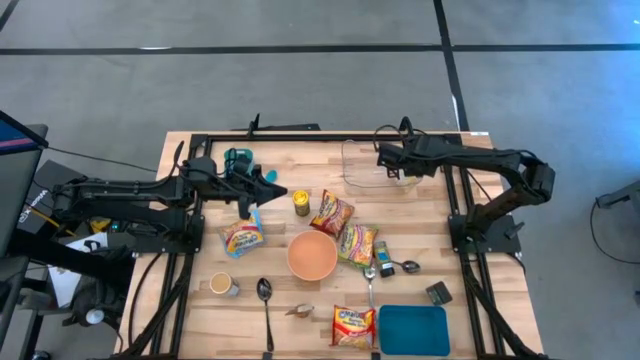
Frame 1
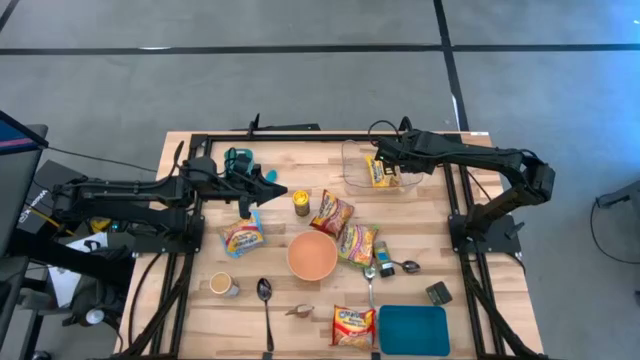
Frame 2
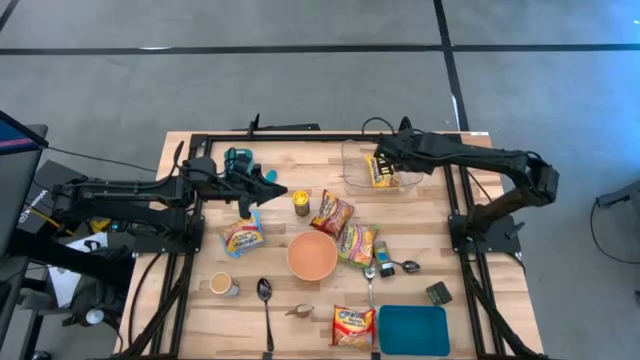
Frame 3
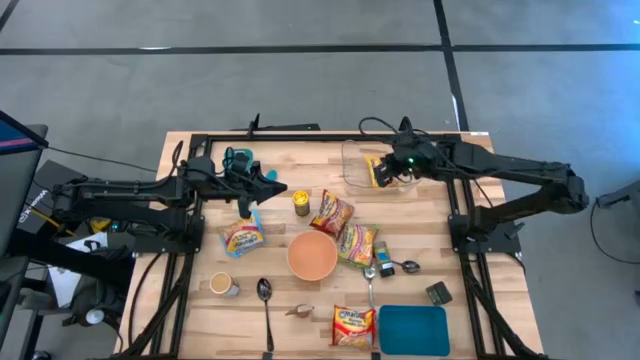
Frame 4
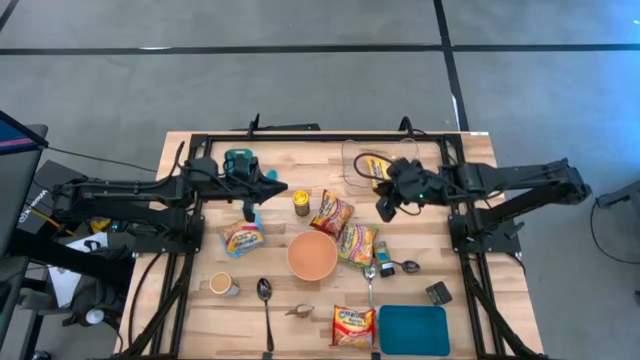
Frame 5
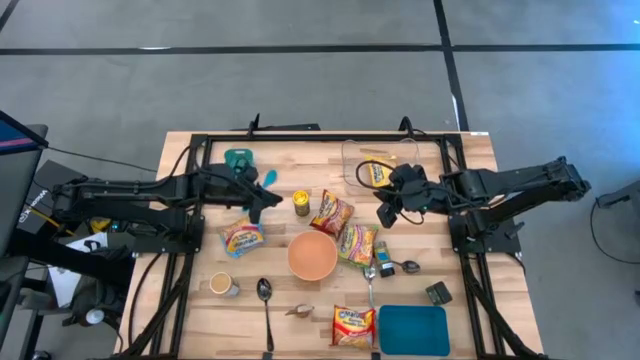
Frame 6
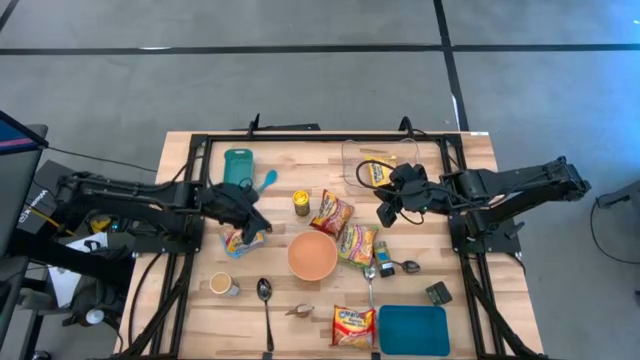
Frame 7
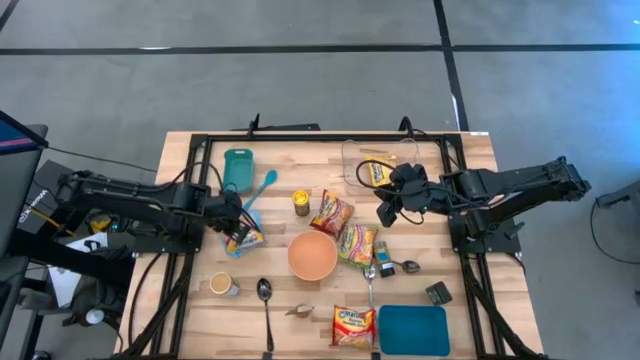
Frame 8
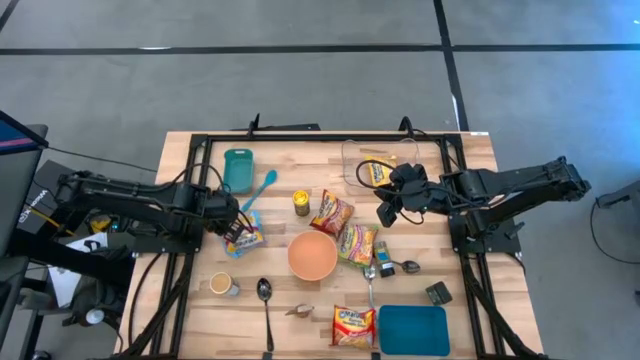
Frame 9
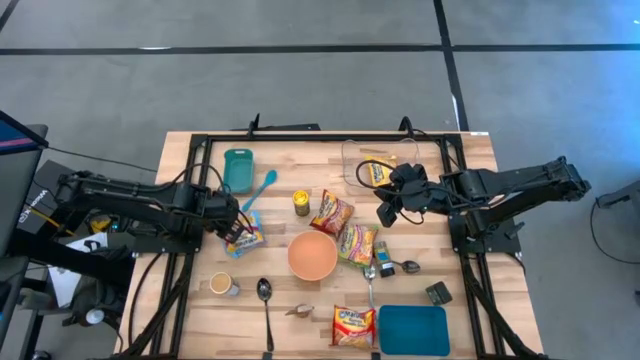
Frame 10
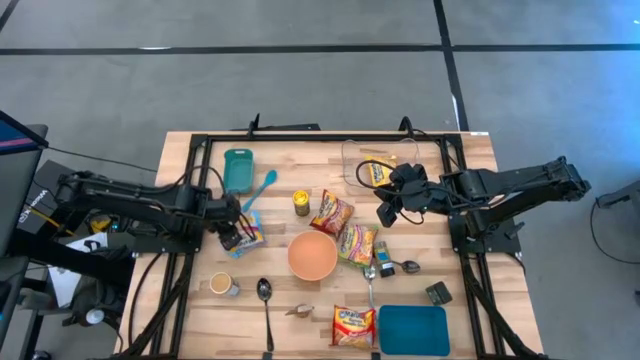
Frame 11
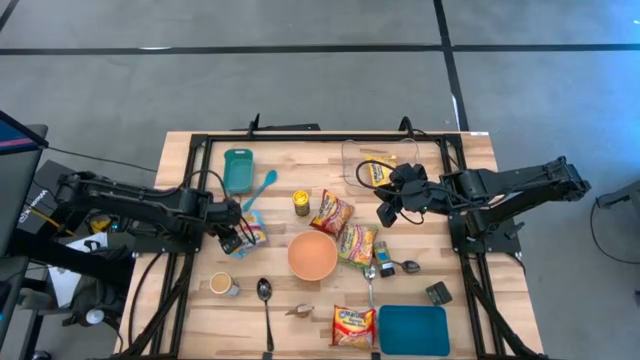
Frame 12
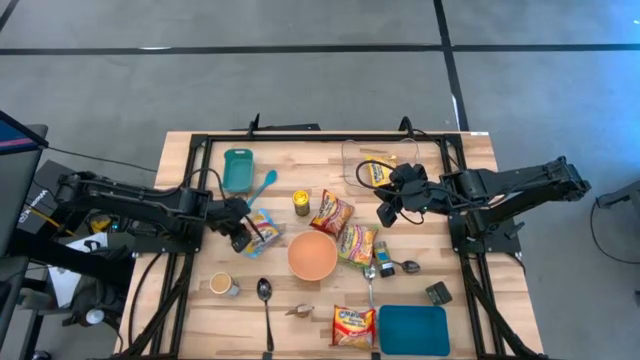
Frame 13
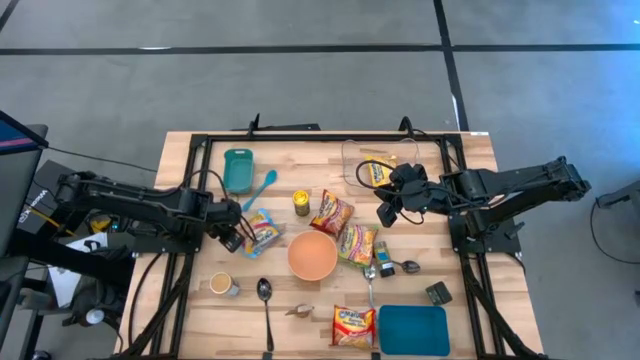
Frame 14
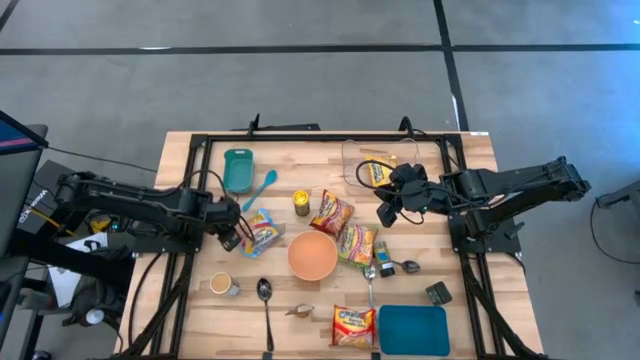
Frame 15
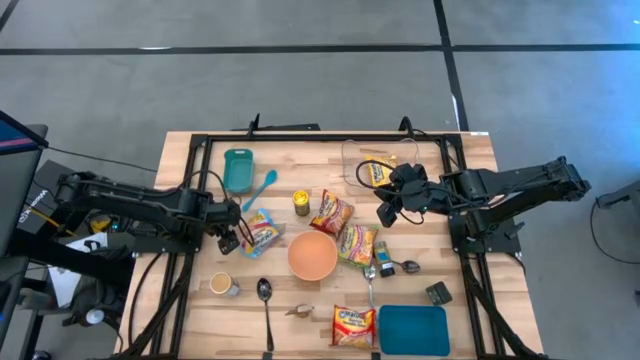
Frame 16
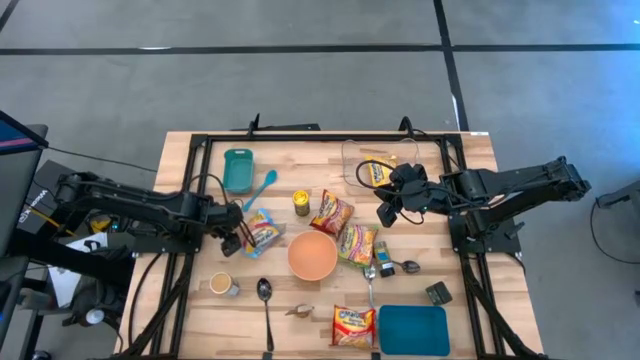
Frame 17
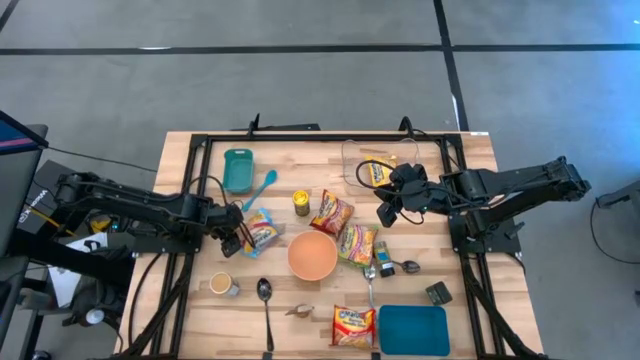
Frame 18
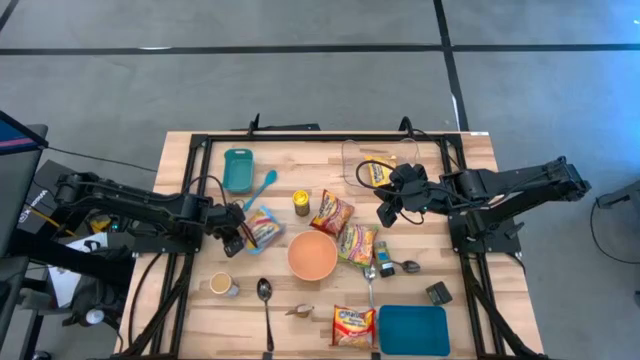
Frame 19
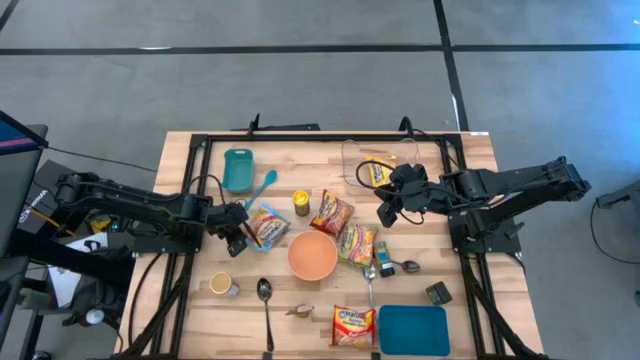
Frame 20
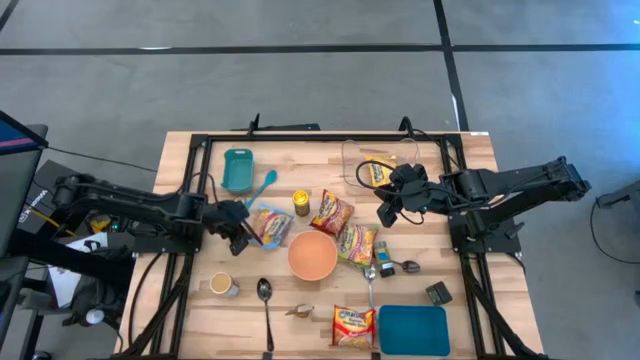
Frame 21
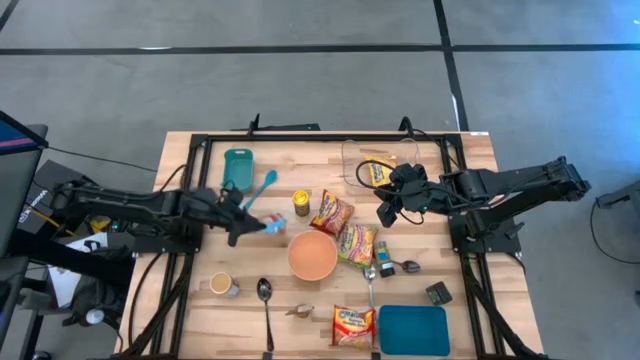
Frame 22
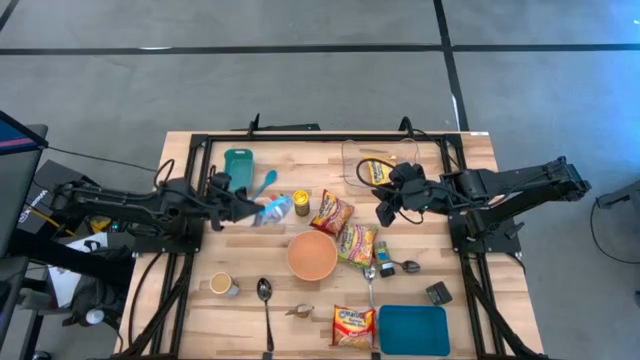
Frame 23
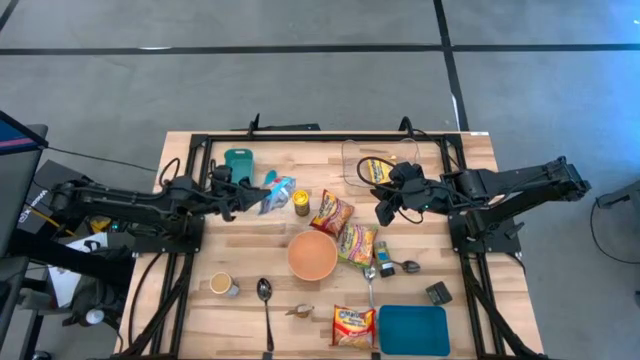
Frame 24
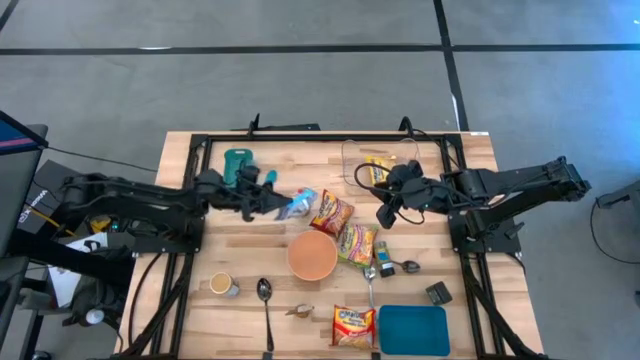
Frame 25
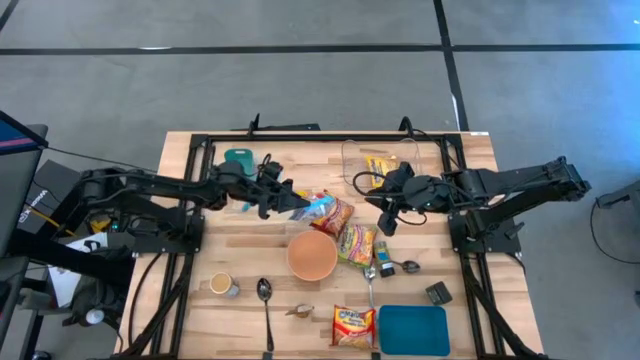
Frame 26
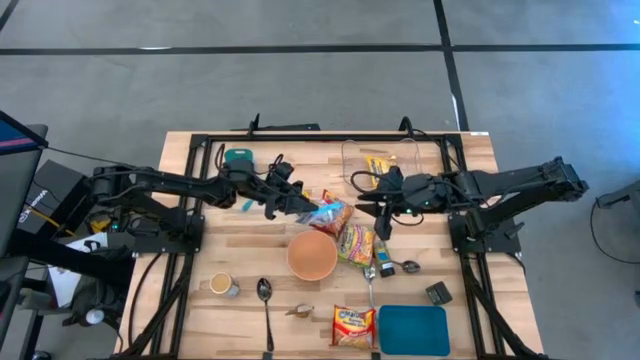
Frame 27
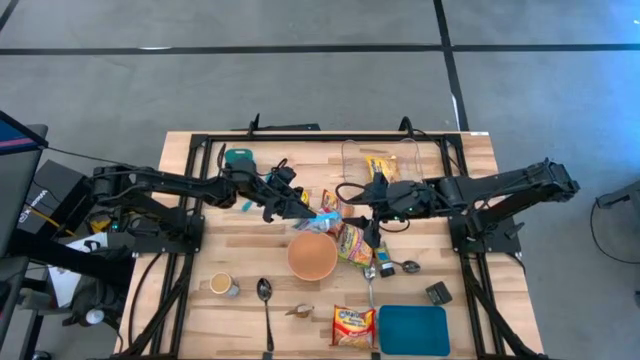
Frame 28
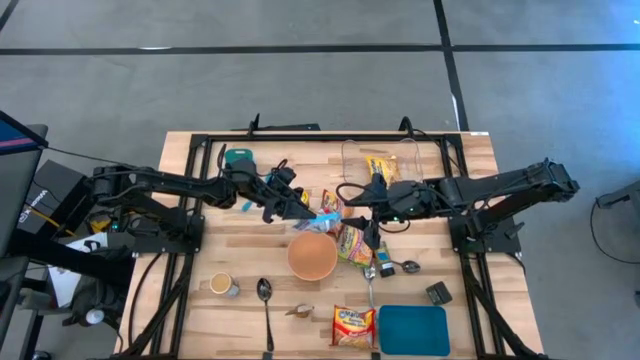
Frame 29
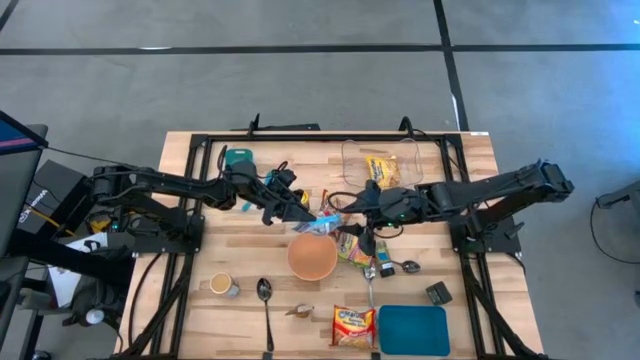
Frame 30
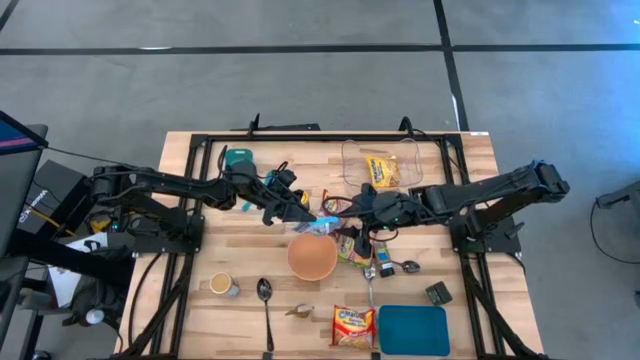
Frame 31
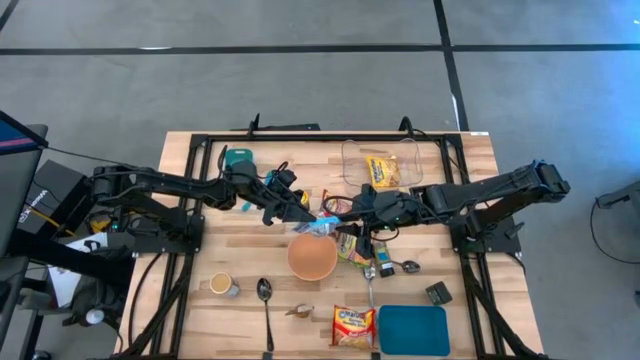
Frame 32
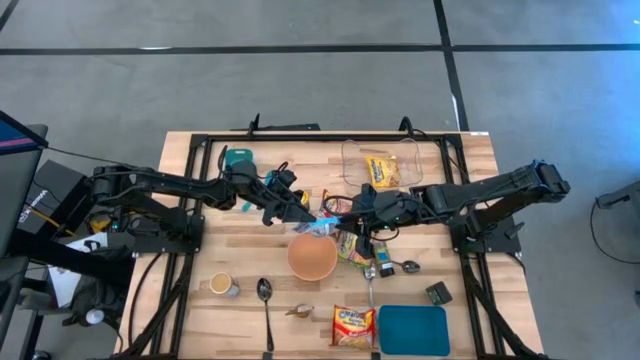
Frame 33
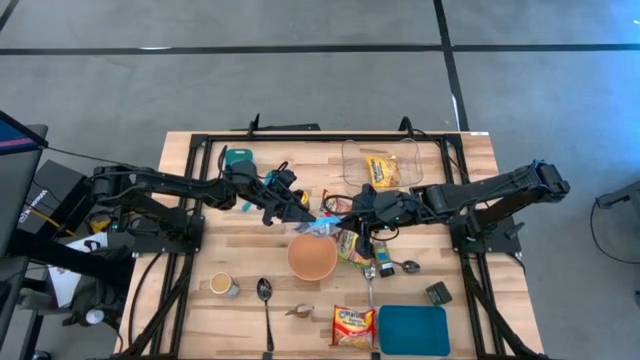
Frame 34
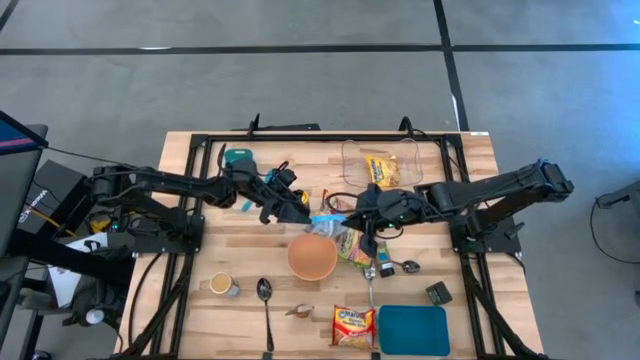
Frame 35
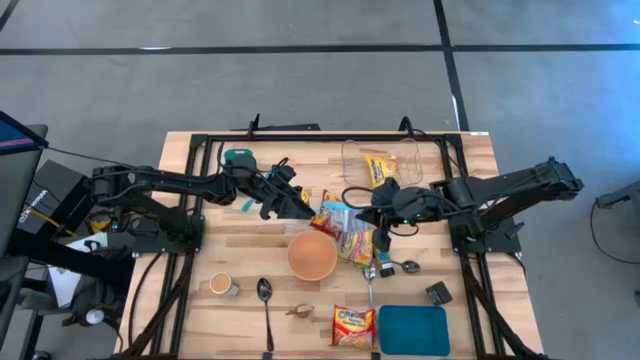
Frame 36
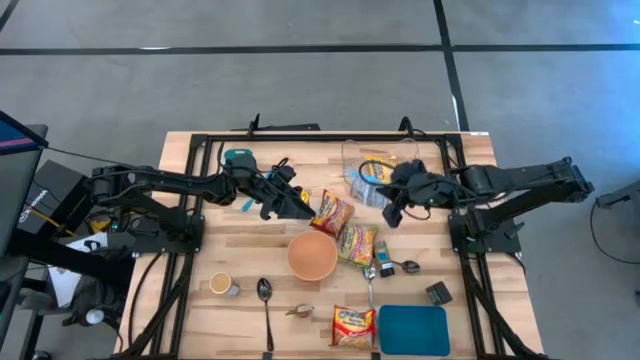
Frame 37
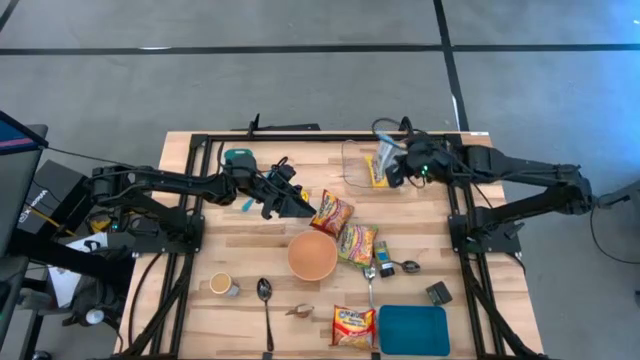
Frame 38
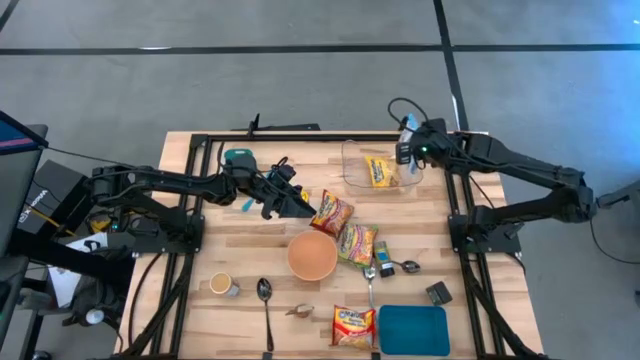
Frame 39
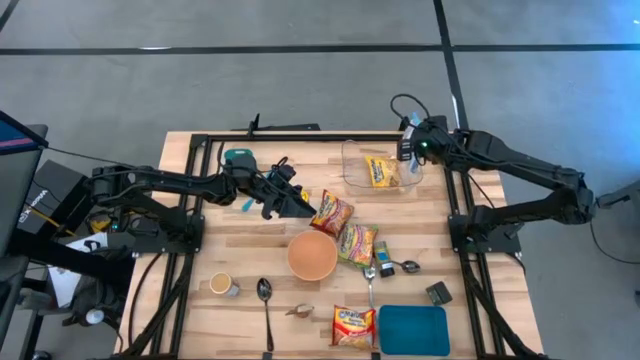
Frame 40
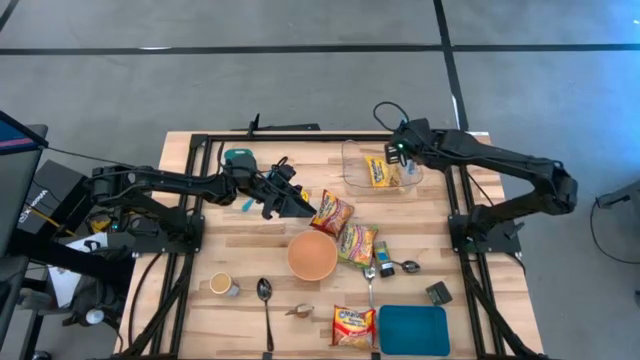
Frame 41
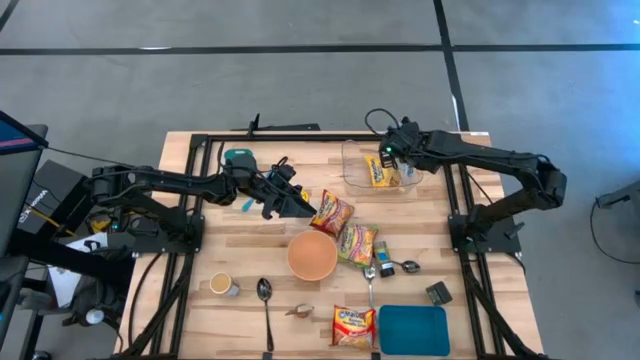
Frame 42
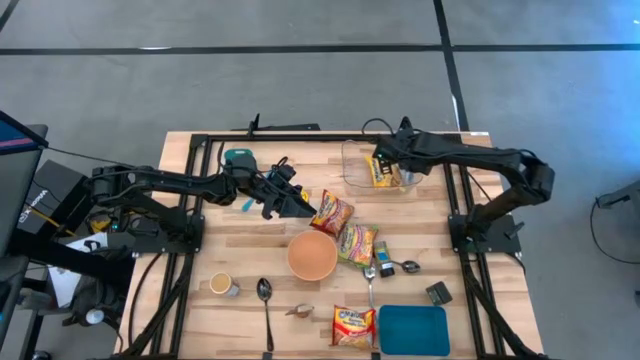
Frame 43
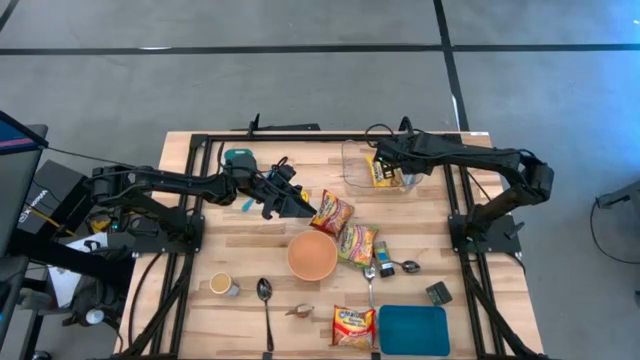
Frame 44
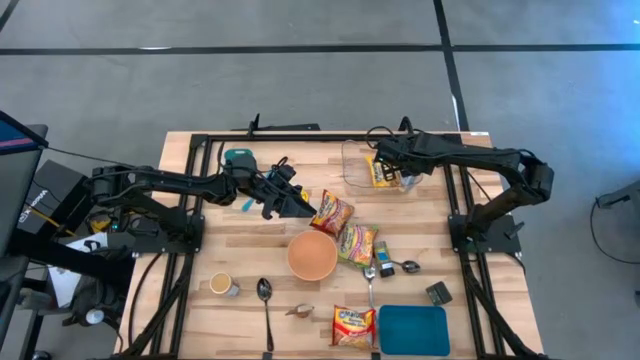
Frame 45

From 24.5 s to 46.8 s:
Task: Pick & Place Food Item
Put the light blue noodle pack into the transparent bin

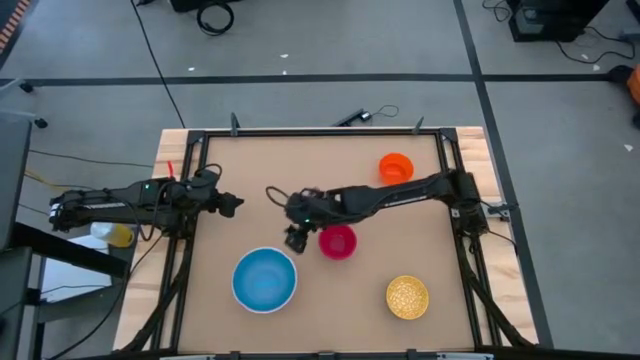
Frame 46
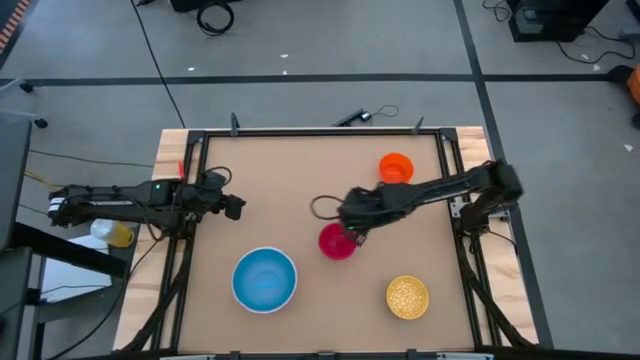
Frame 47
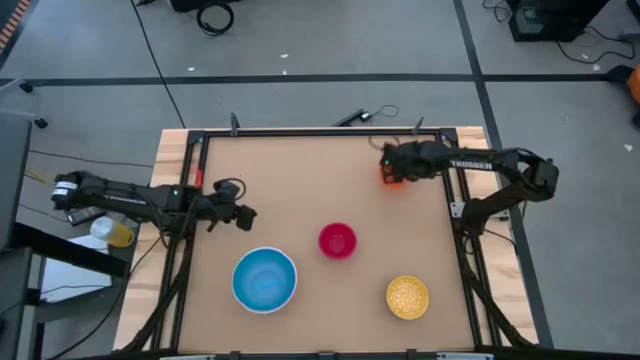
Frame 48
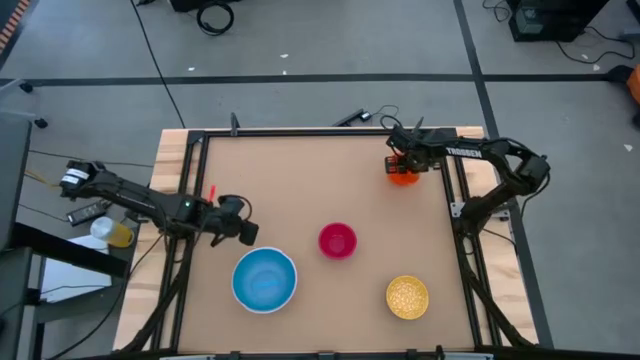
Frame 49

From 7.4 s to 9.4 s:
Task: Nest bowls inside each other by size order
Stack the orange bowl on top of the blue bowl
